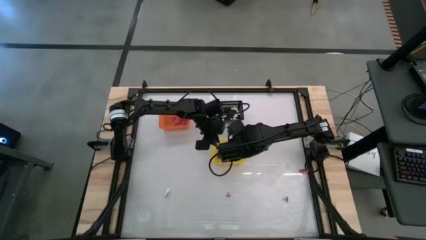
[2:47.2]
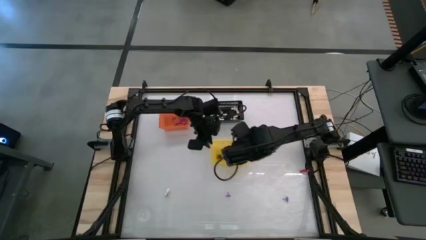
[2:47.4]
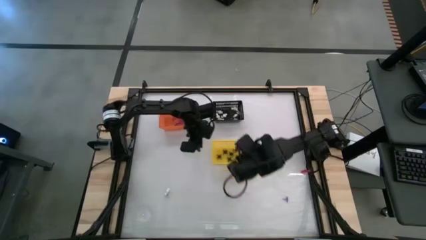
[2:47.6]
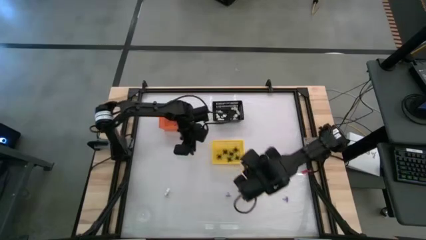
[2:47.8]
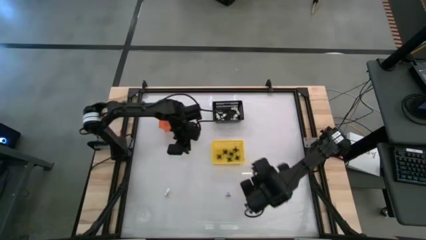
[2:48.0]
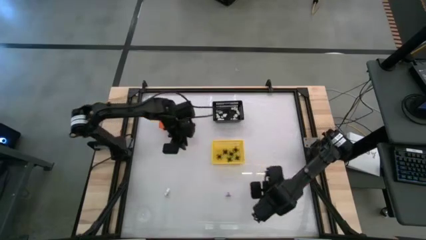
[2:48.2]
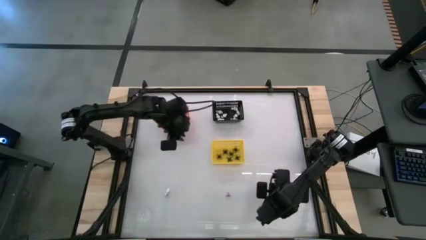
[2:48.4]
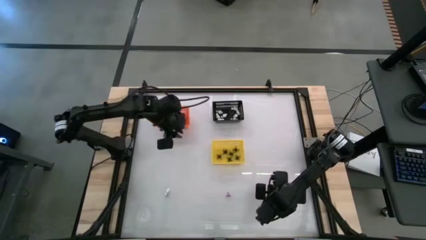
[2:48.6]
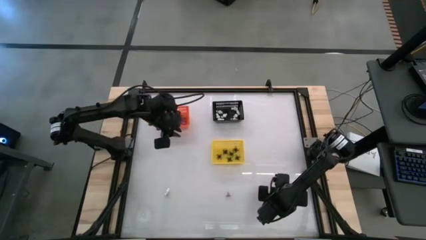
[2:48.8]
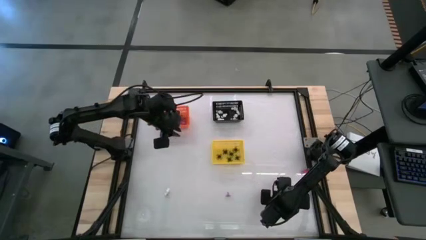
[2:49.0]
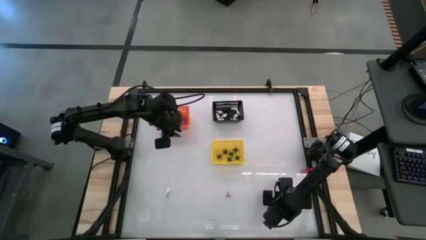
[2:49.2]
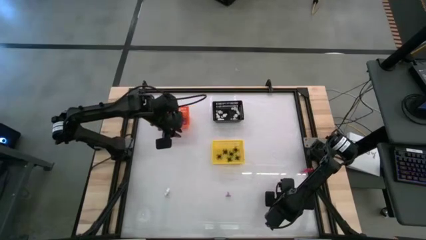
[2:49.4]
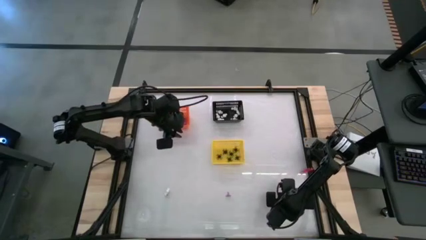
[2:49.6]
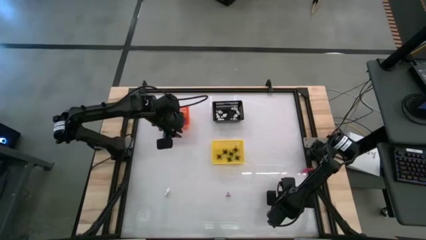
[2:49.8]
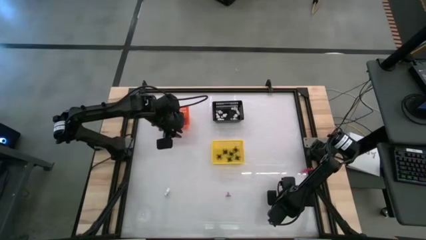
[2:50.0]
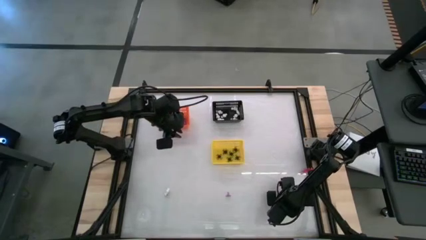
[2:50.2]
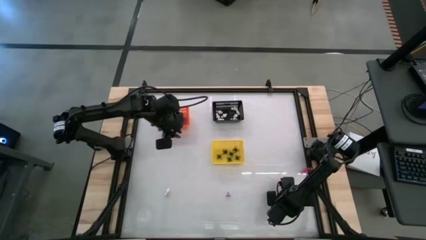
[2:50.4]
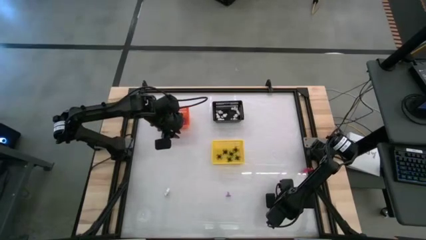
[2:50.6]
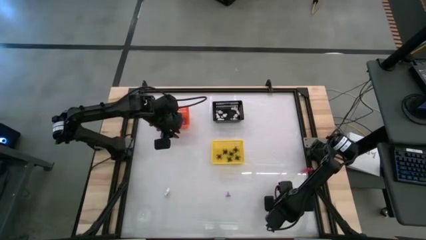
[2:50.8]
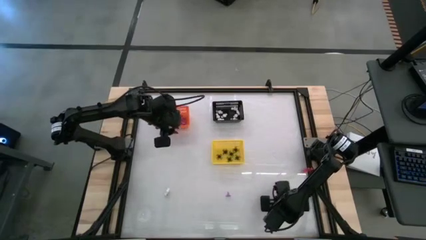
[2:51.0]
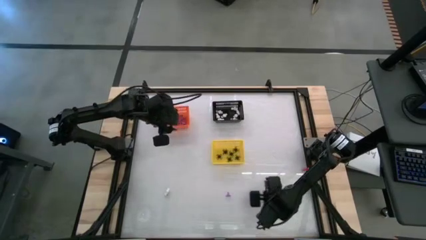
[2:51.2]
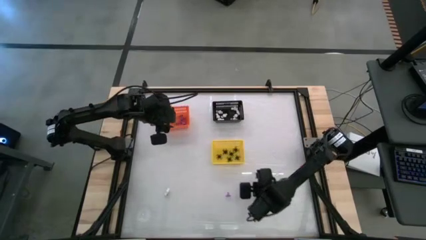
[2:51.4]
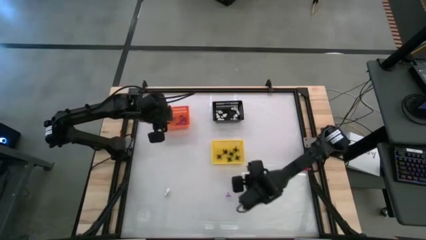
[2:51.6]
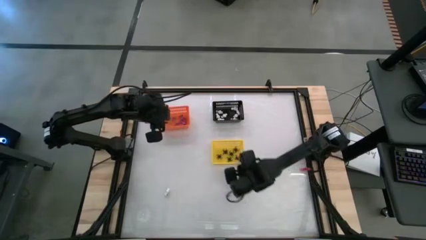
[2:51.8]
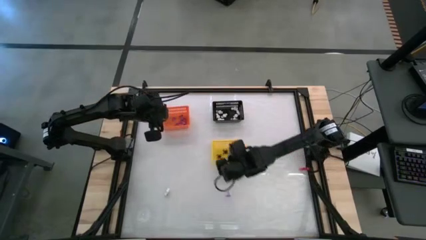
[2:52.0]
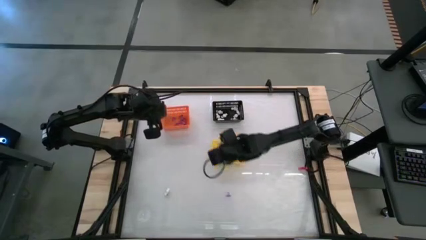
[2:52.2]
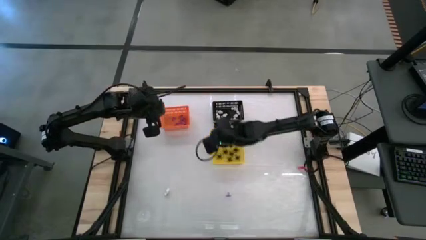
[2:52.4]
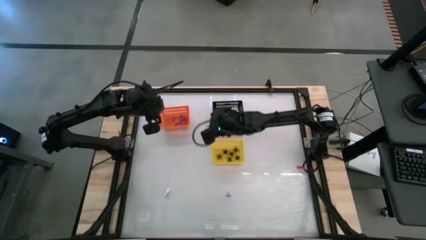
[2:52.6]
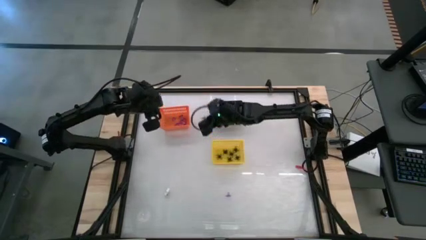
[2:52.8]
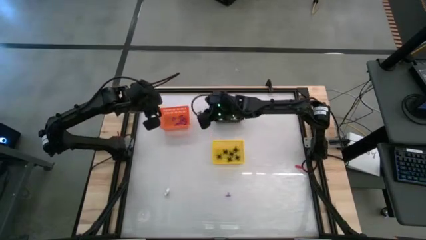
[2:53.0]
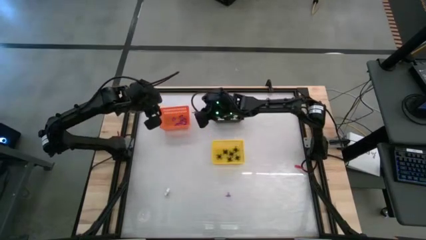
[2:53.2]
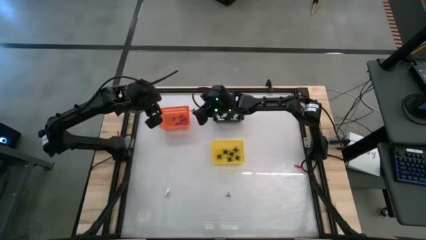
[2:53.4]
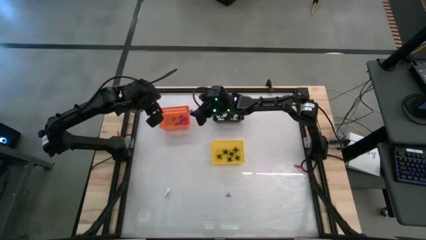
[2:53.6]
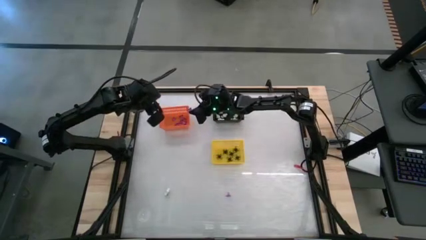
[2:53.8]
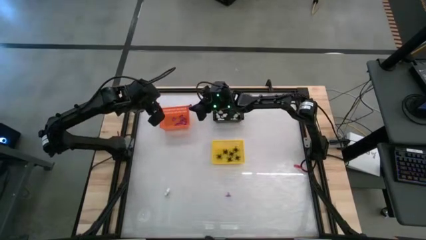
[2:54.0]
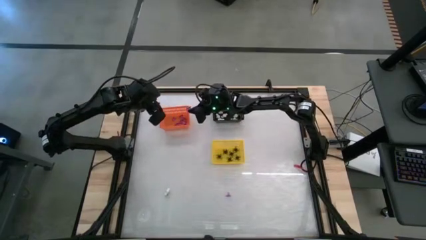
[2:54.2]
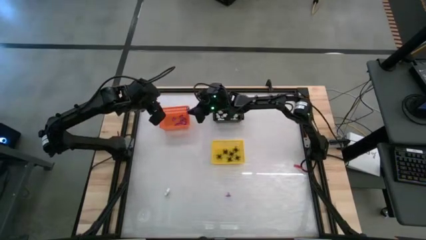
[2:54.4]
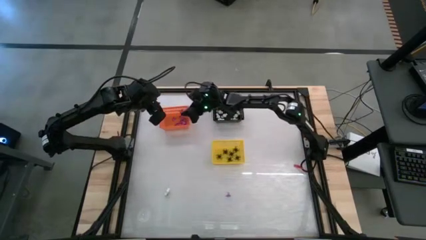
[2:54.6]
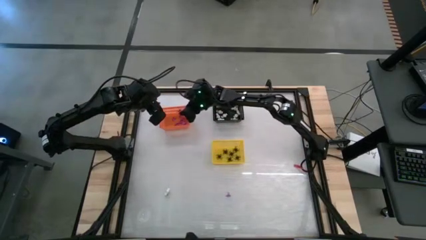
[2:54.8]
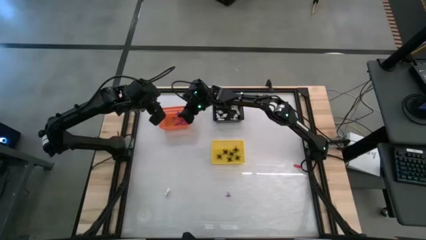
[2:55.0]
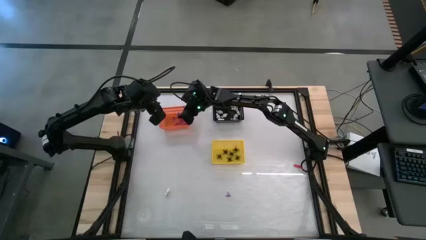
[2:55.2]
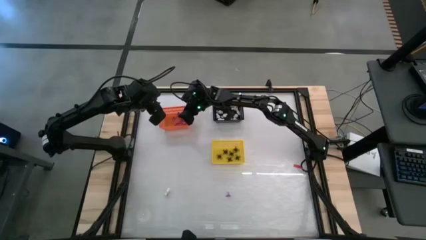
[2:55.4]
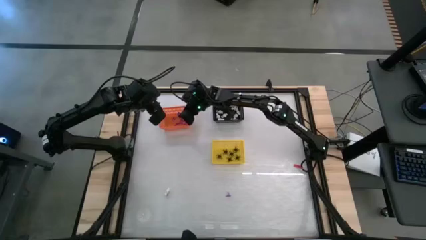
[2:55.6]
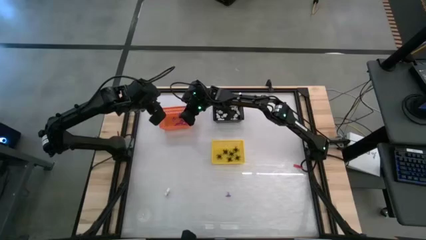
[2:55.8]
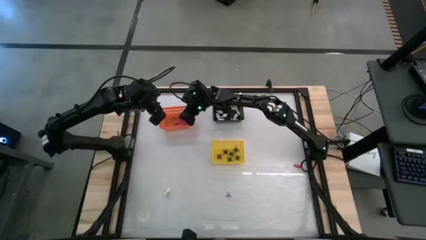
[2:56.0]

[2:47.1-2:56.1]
Task: Sort Halloween decoration
Put the violet witch hat into the orange bin

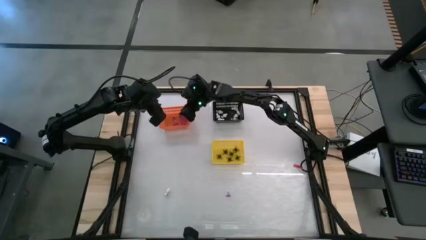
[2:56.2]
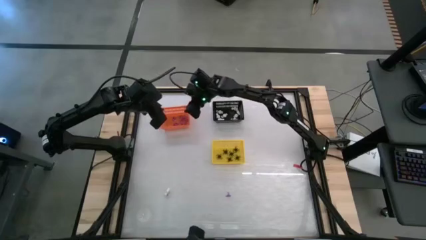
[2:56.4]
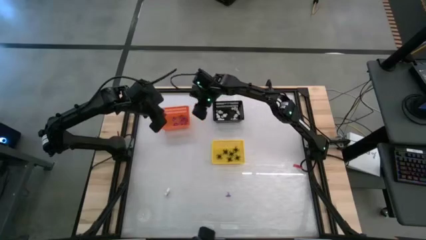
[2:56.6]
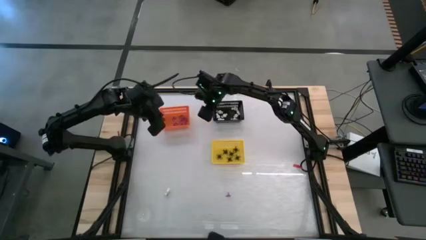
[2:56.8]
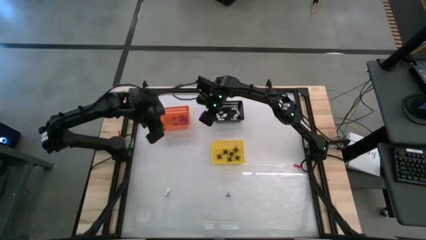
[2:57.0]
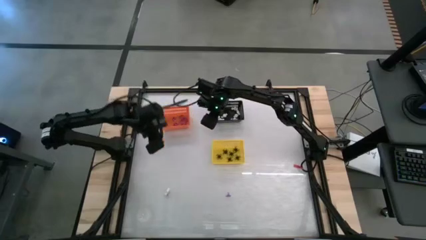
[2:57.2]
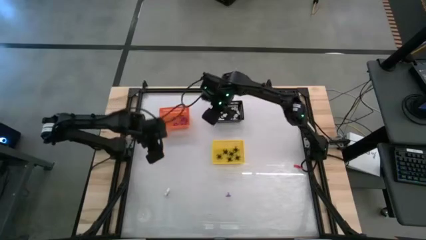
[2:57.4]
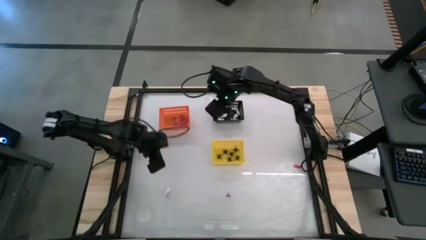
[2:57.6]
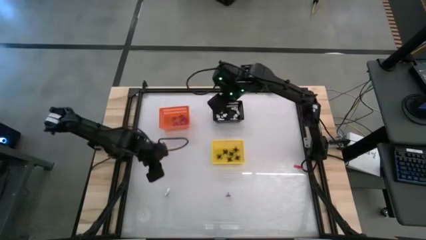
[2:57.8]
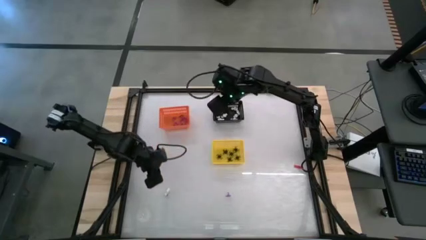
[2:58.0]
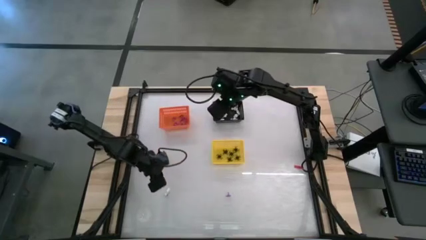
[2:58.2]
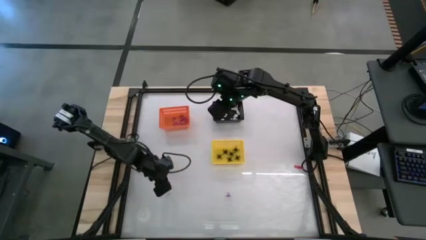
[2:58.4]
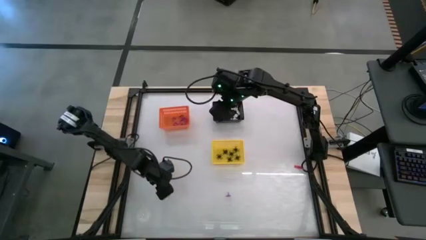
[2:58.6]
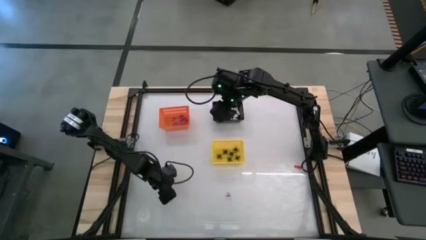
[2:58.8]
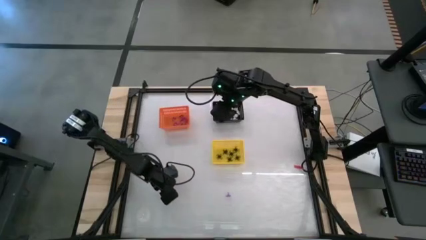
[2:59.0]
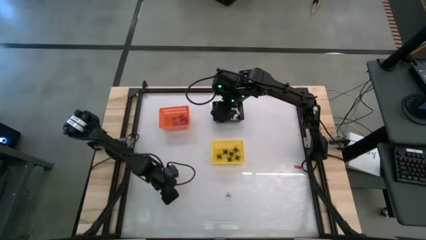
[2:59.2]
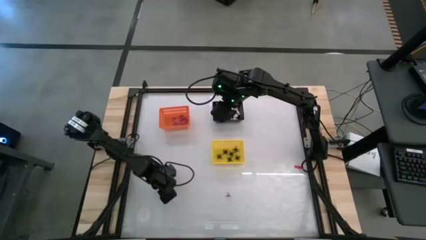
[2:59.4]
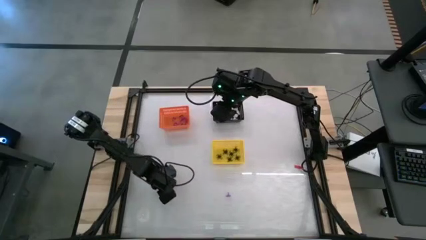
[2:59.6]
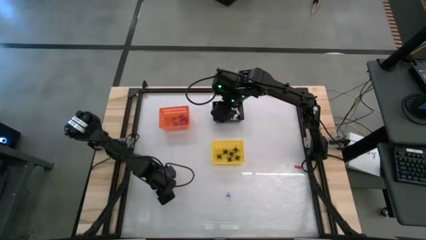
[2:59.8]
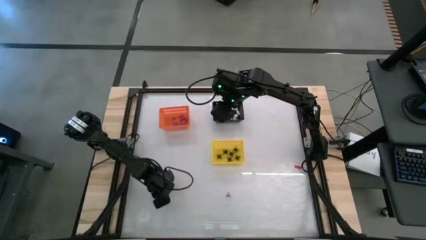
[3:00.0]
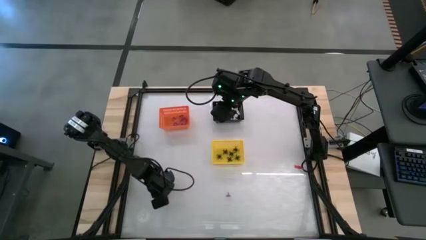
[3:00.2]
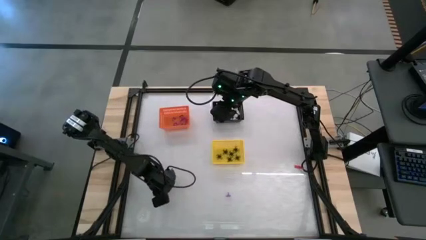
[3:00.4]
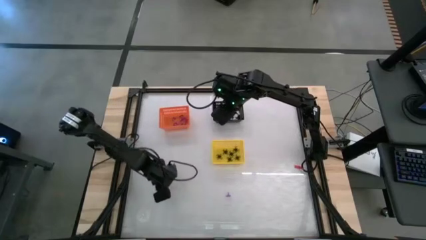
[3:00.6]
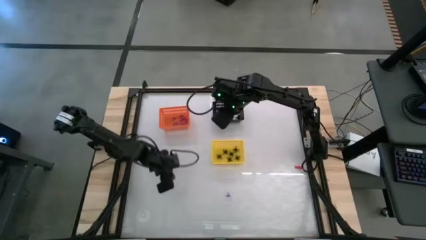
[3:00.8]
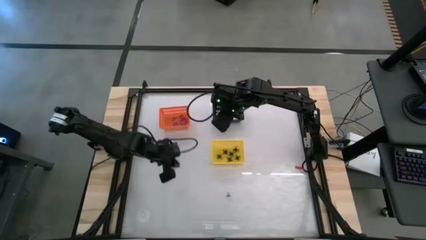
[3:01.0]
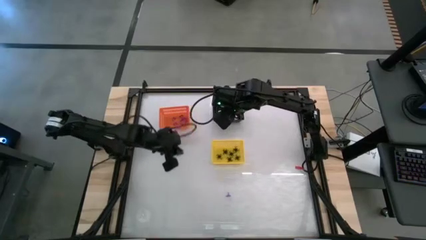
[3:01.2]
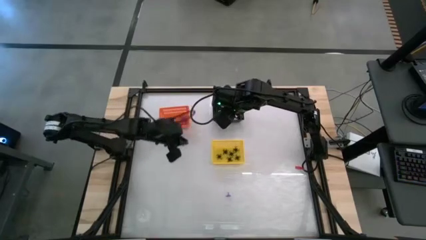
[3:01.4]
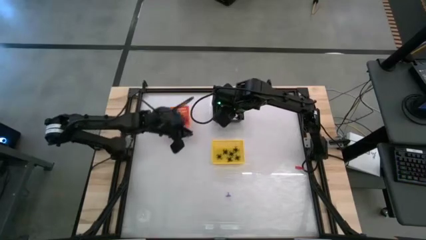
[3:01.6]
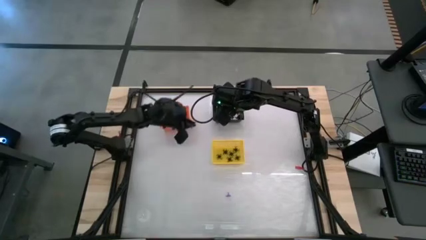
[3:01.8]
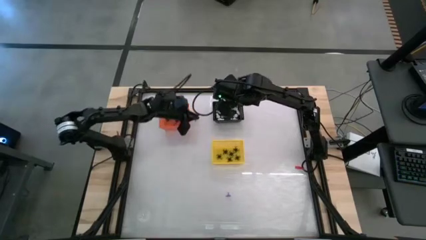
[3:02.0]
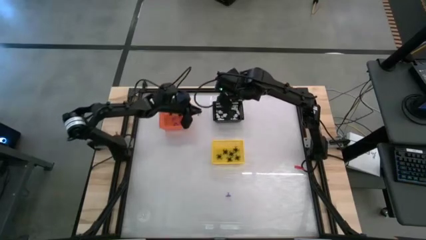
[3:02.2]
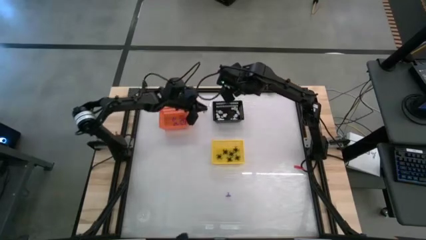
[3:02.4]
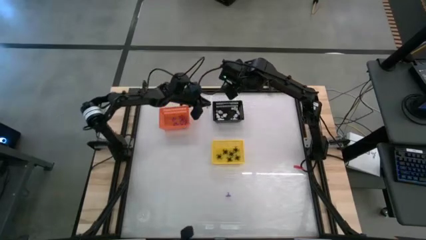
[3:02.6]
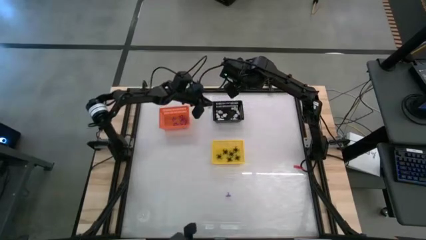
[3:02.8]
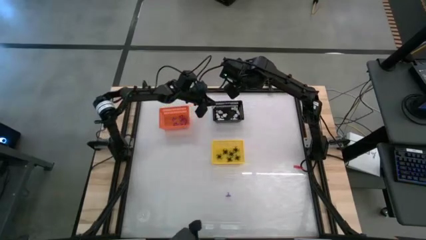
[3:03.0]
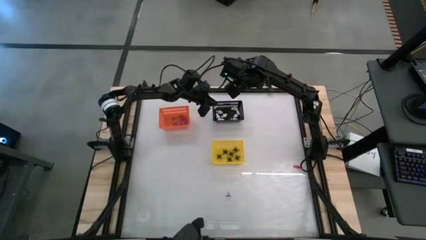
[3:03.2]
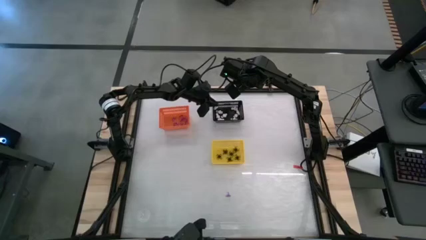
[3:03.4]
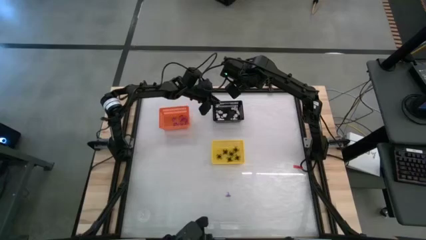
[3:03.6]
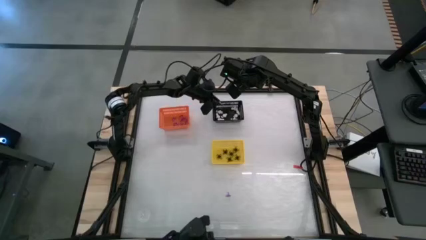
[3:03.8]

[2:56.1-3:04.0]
Put the white skeleton toy into the black bin
